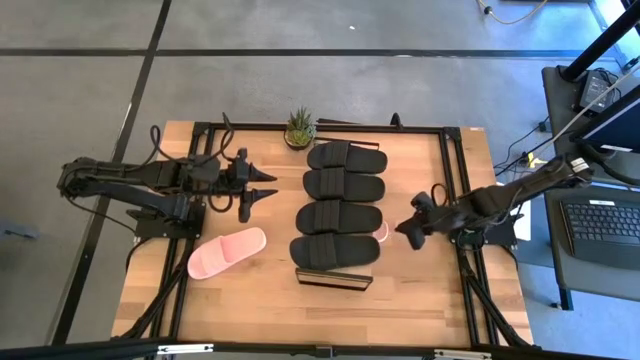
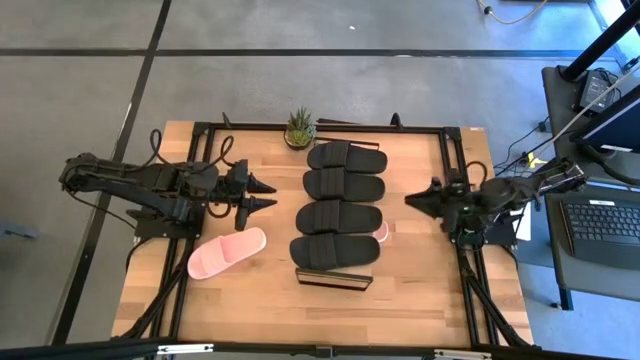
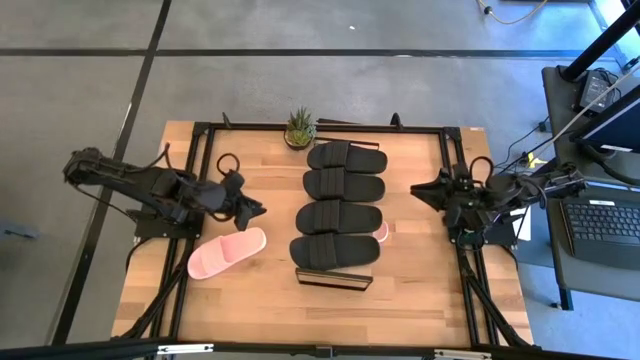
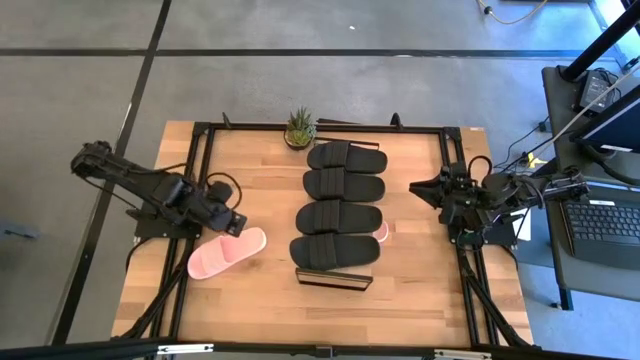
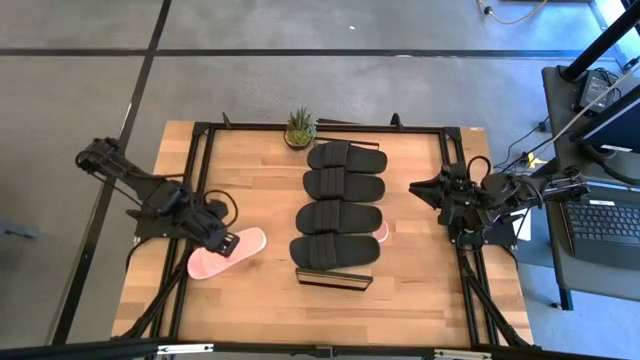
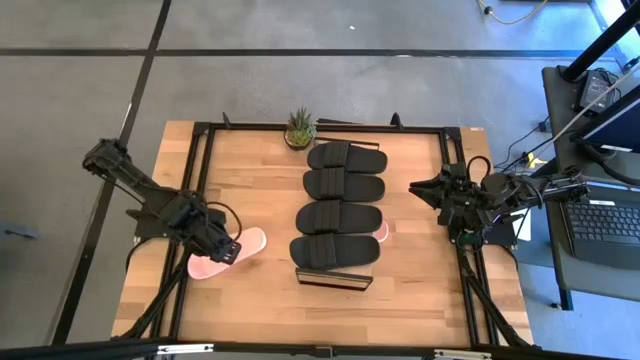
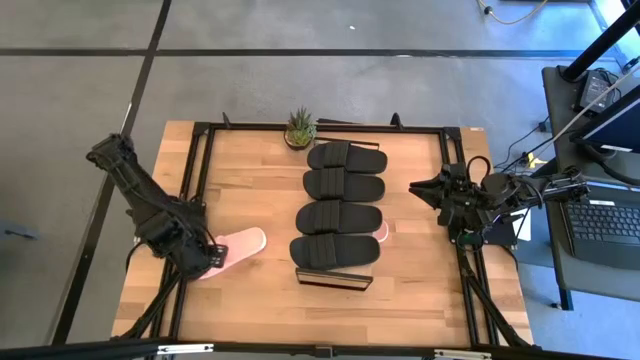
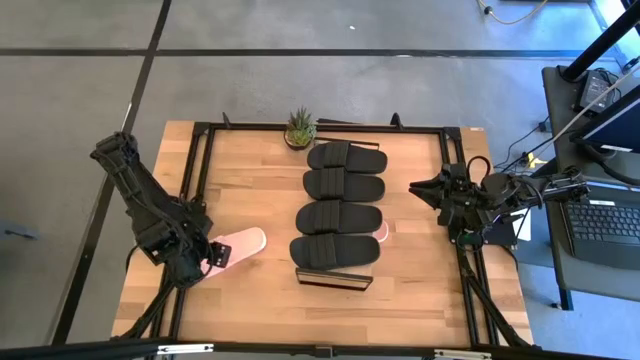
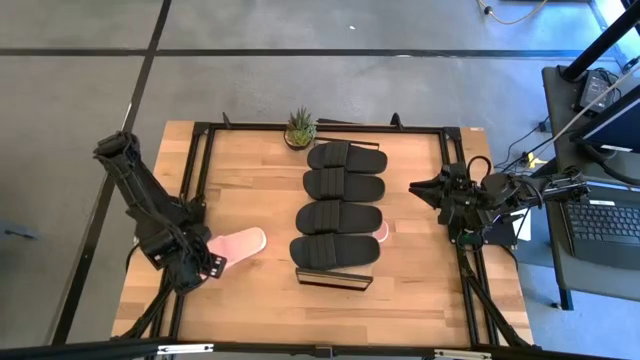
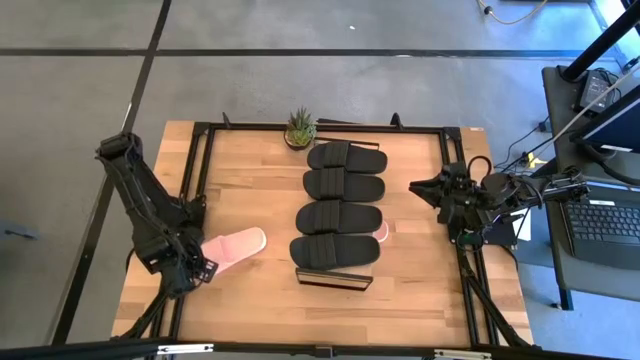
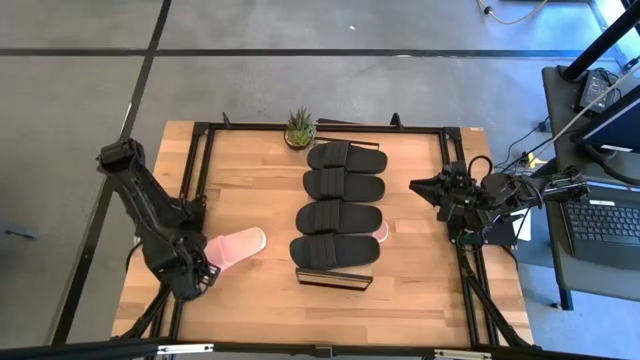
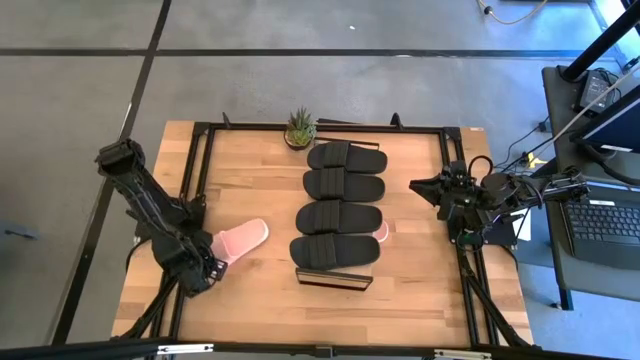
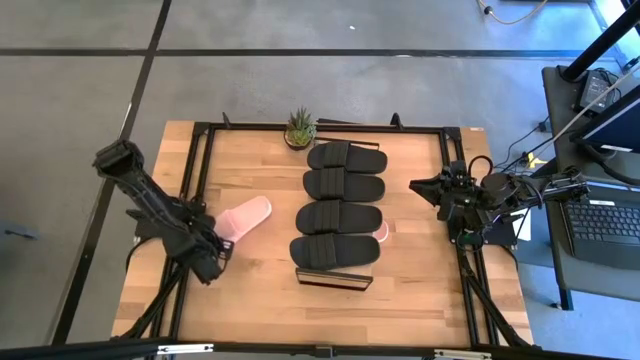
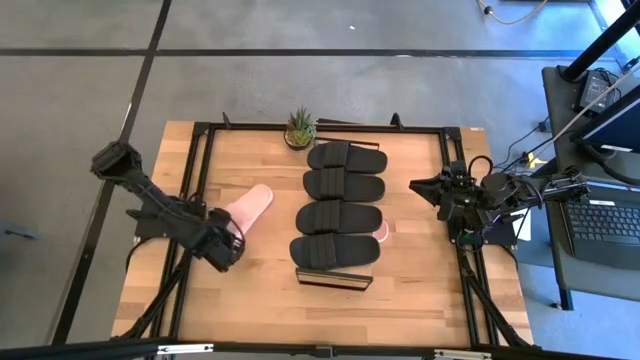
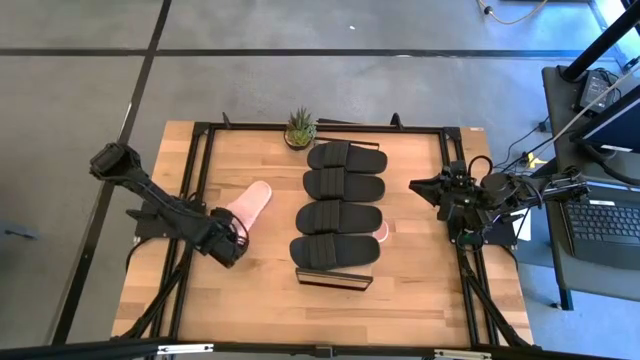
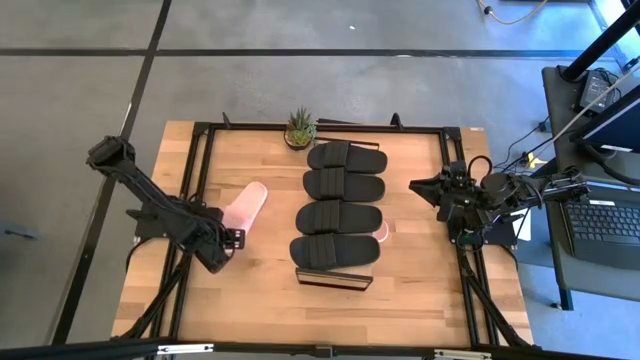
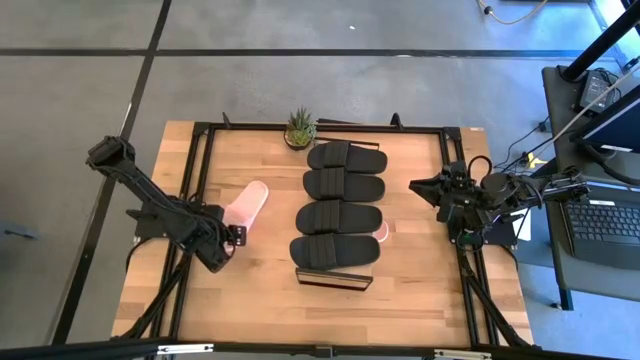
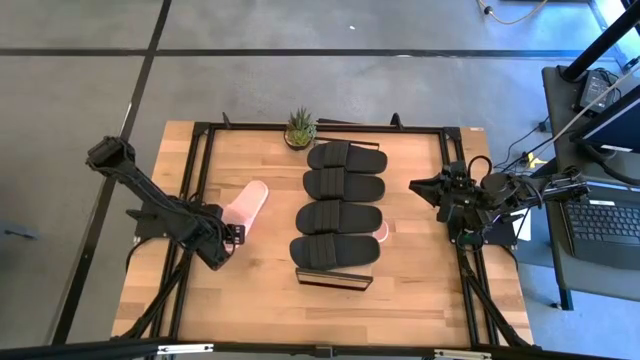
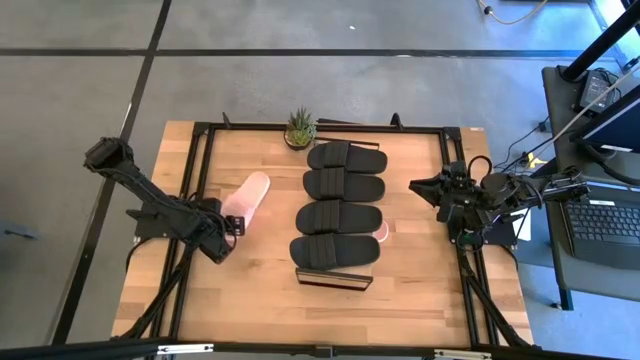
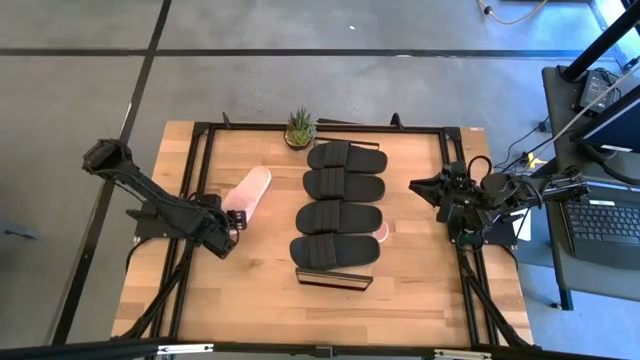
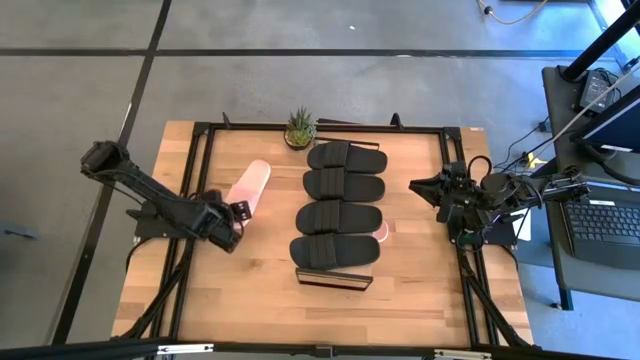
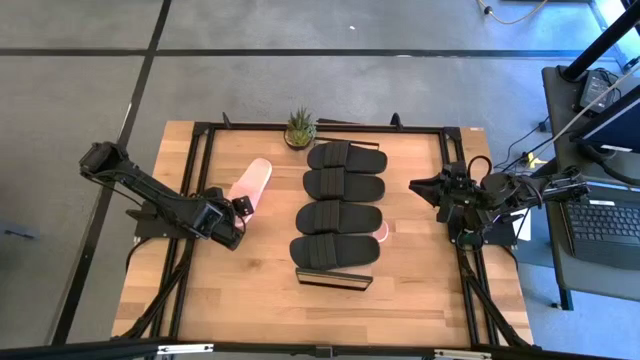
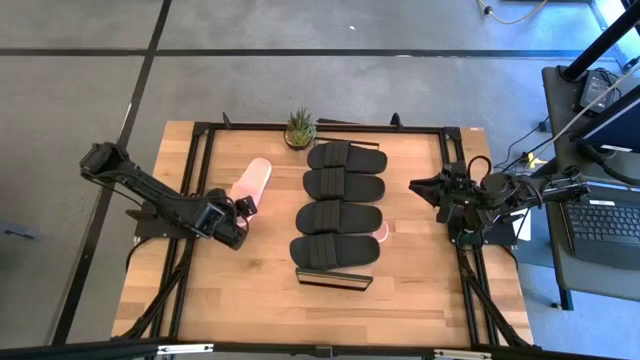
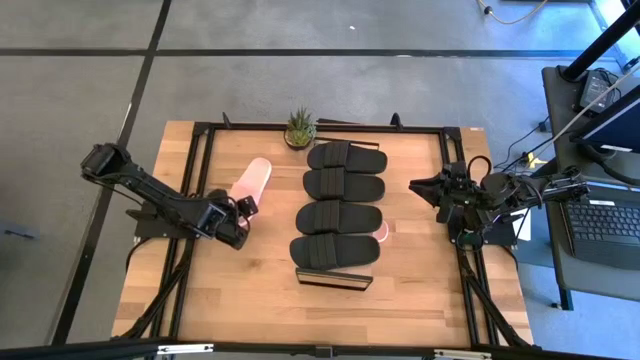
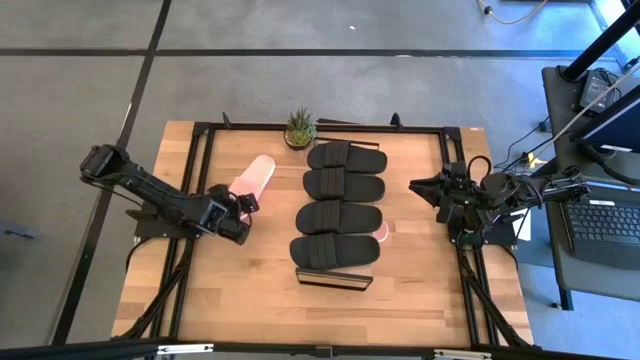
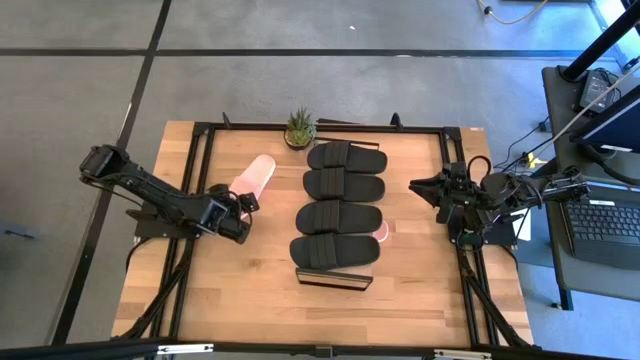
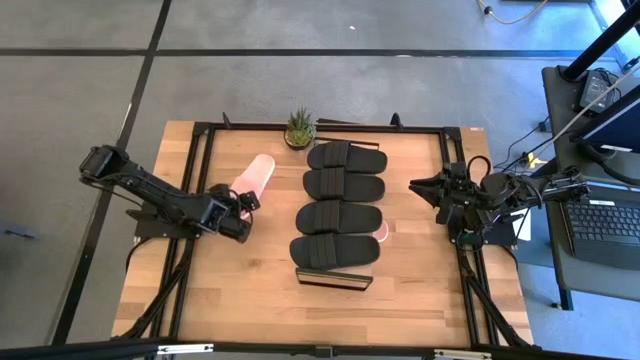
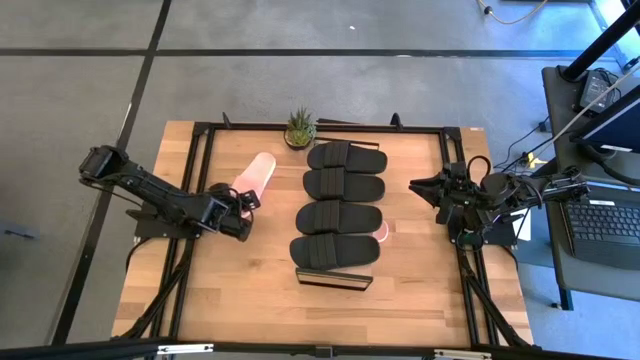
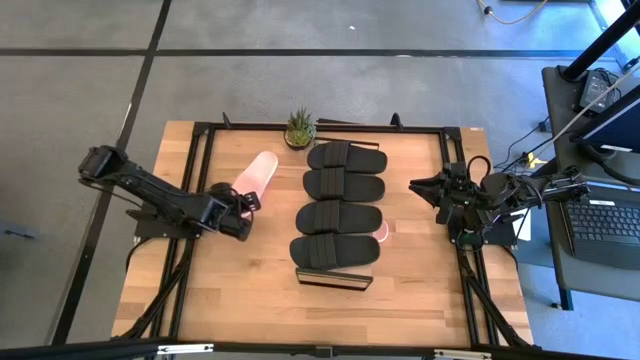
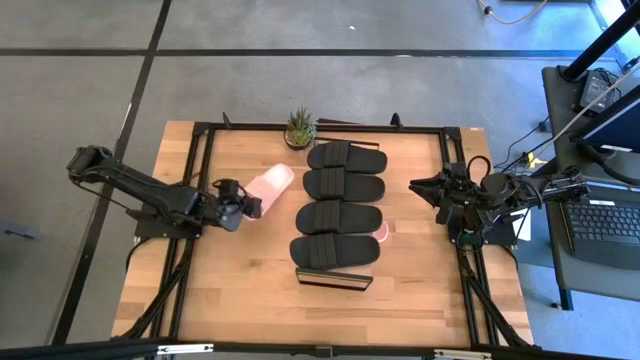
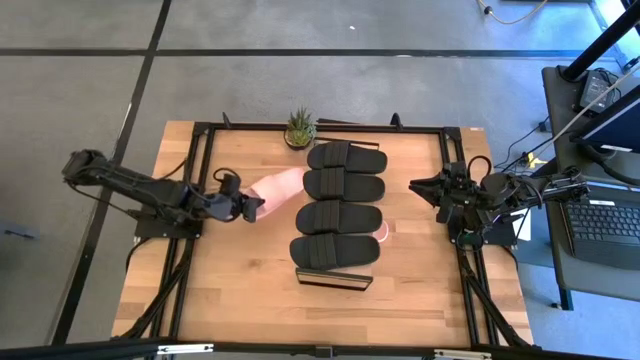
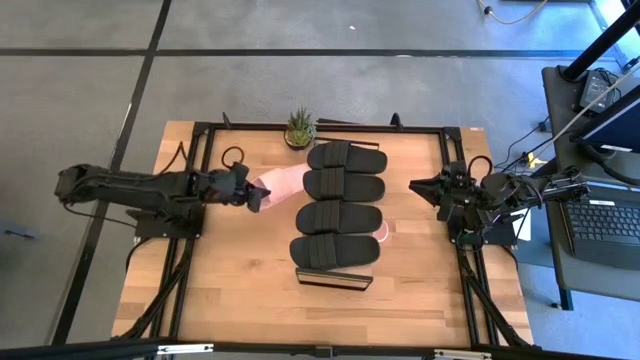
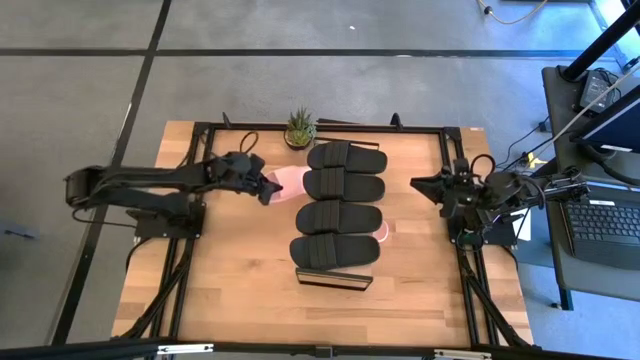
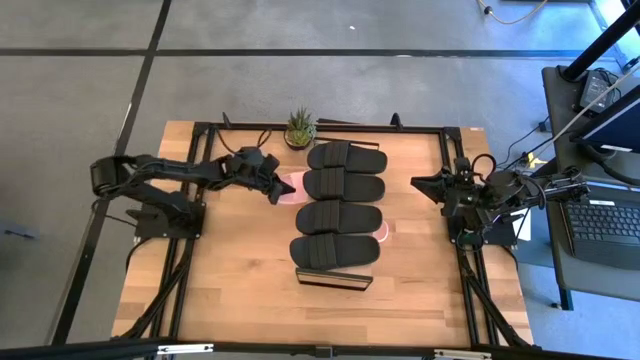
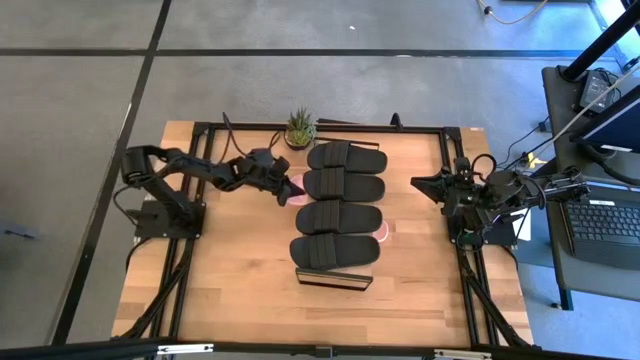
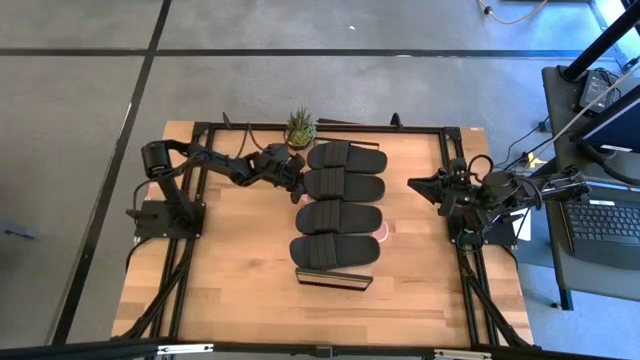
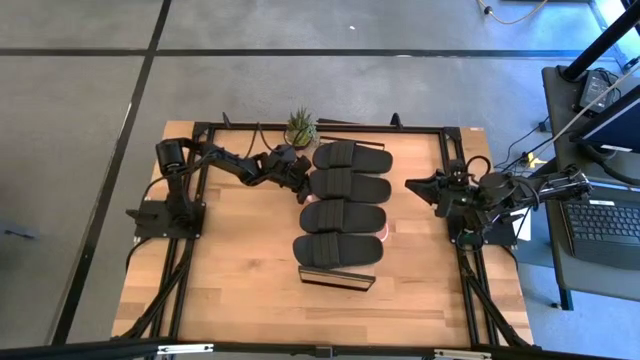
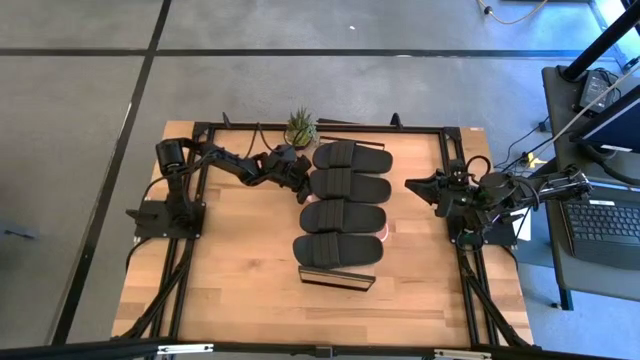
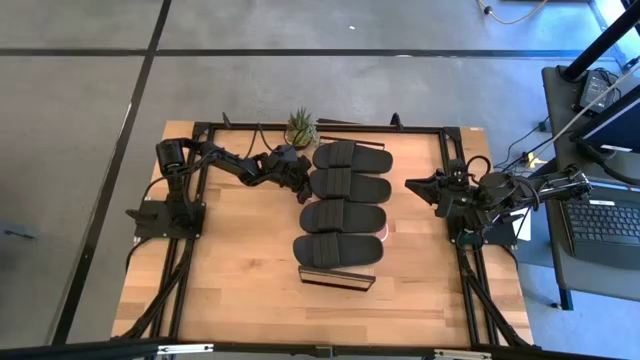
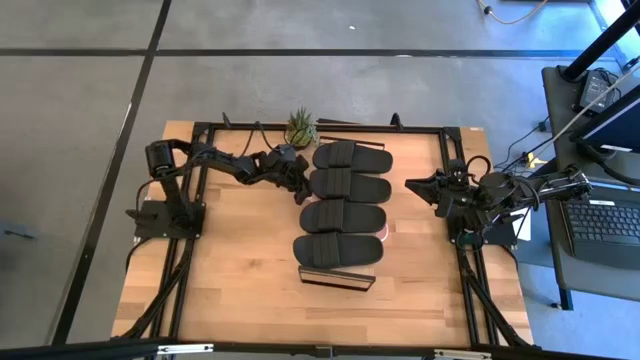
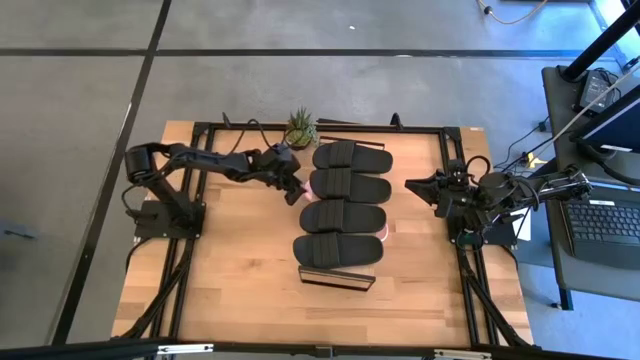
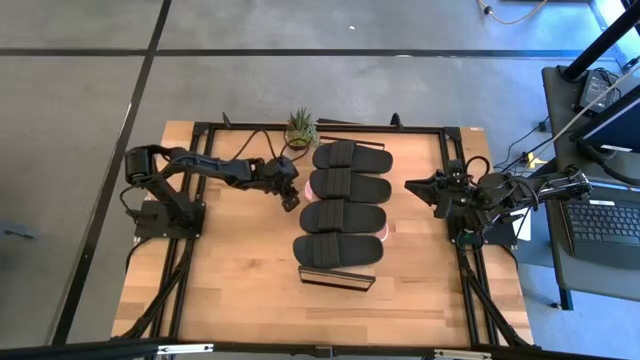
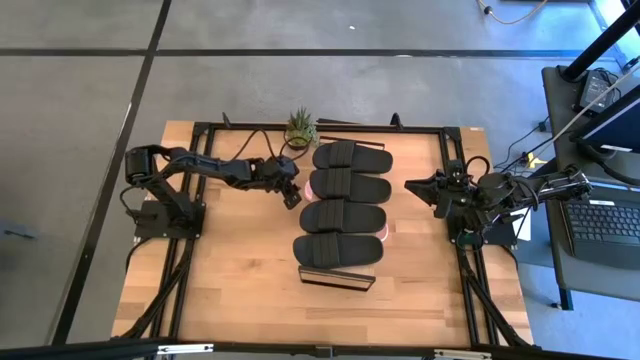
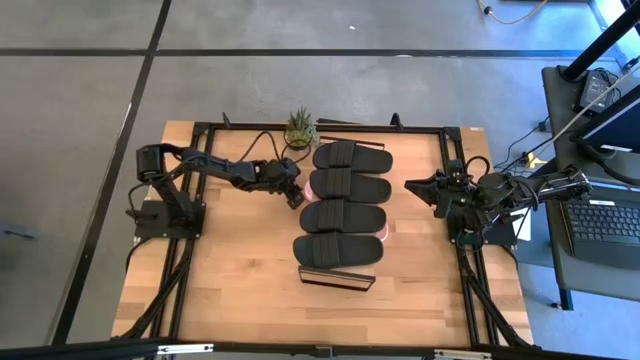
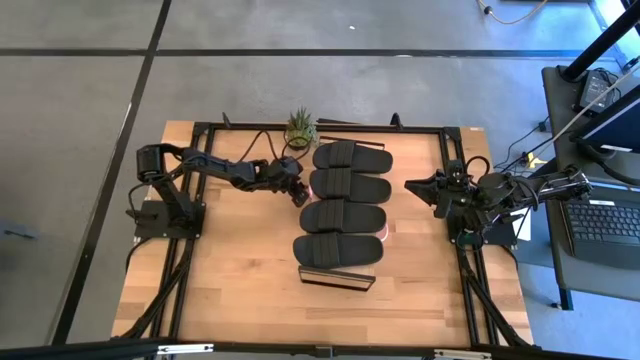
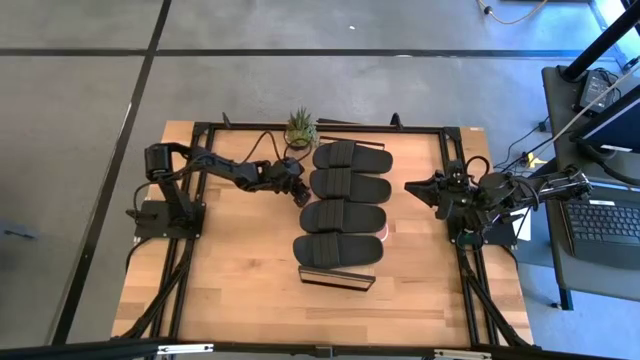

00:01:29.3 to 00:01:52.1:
Task: Pick and place slides into the shelf
Put the pink slipper under the shelf
